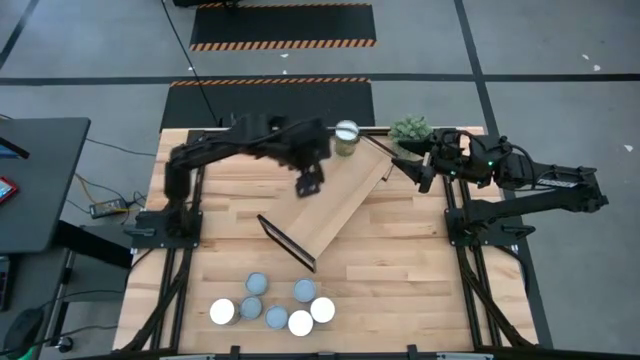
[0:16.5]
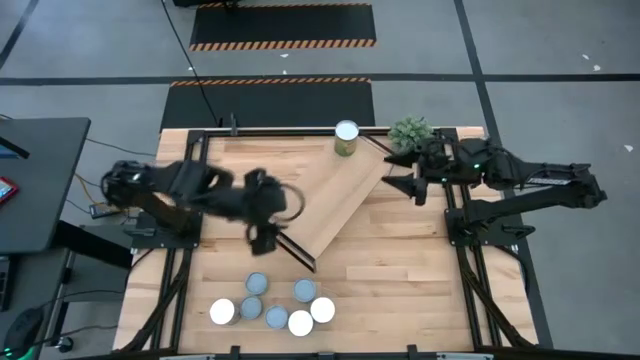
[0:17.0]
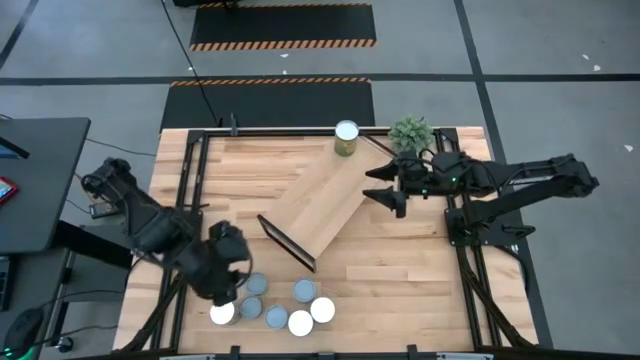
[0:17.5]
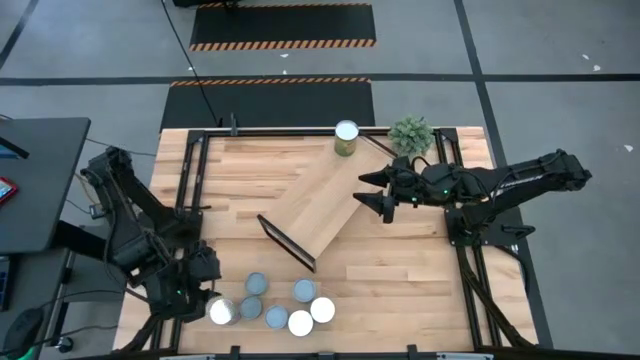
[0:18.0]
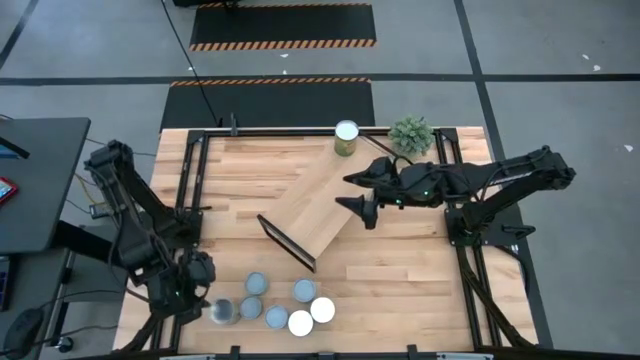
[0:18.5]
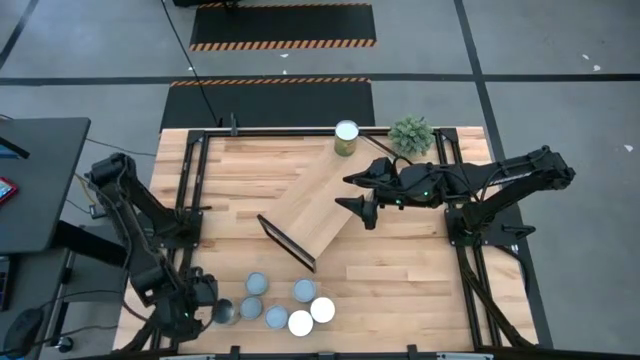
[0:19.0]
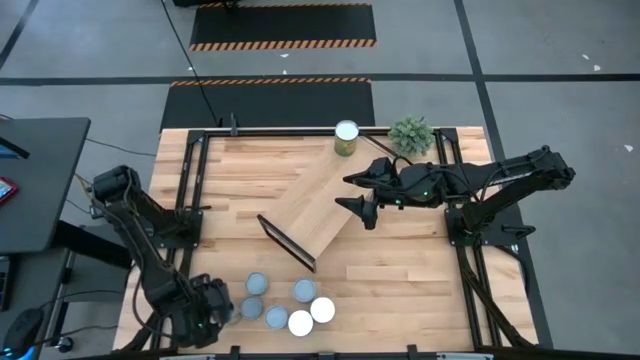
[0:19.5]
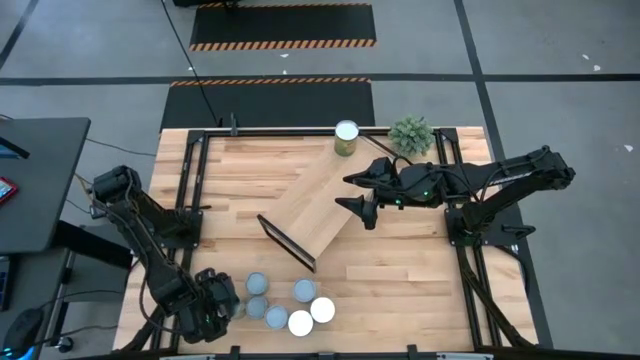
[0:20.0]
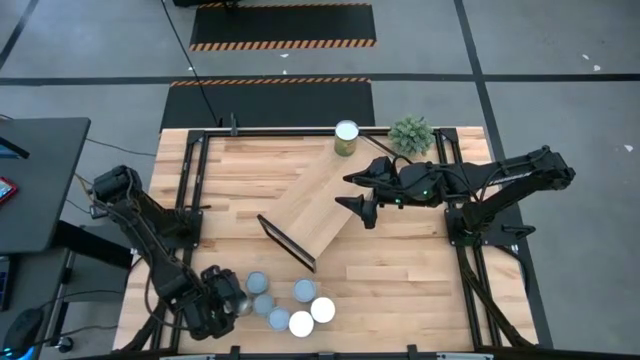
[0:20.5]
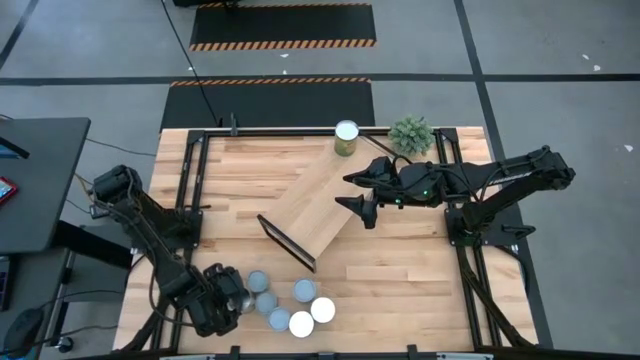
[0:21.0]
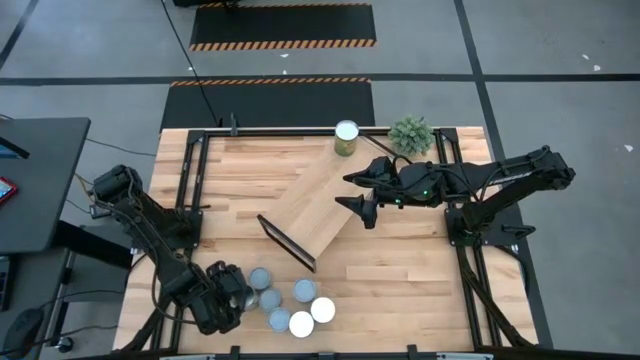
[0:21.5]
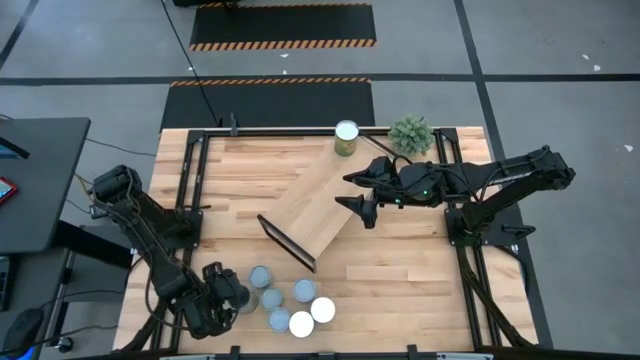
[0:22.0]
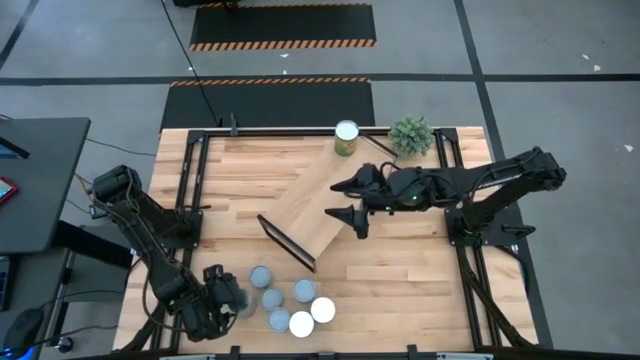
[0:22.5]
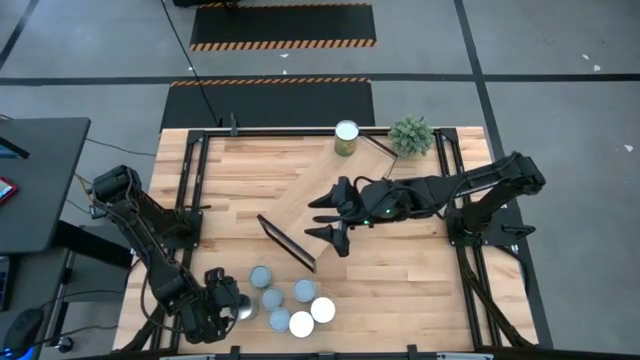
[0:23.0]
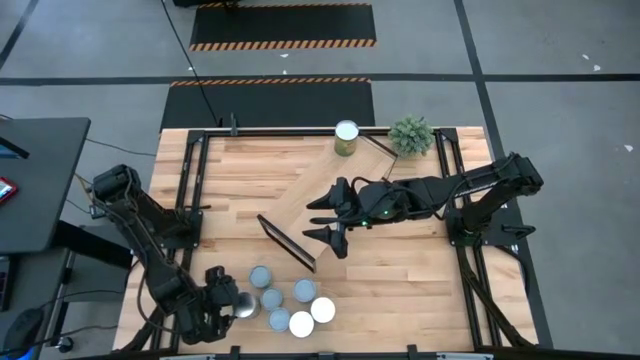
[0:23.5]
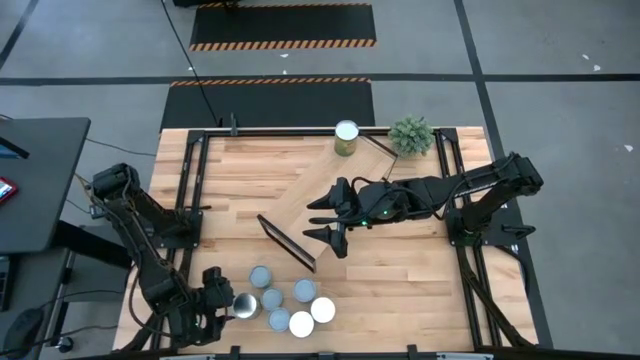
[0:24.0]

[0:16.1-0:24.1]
Task: Pick and place cans onto a shelf
Put the canned peaches on the shelf

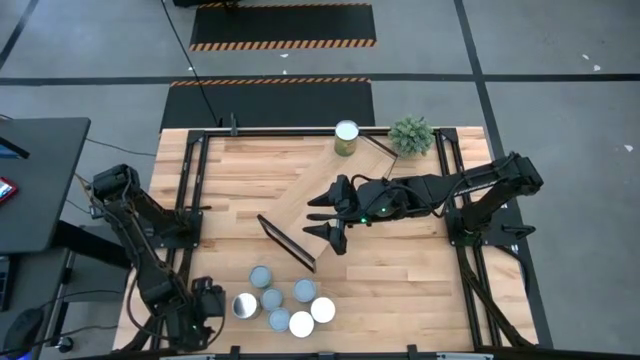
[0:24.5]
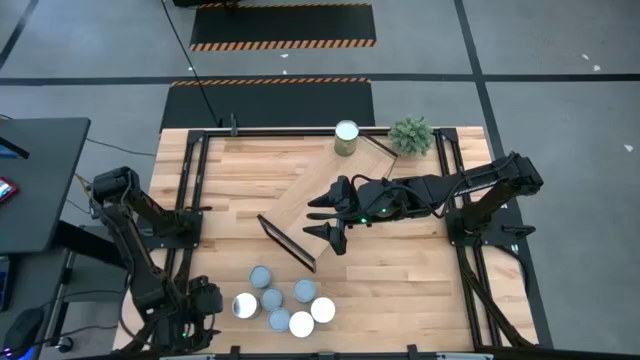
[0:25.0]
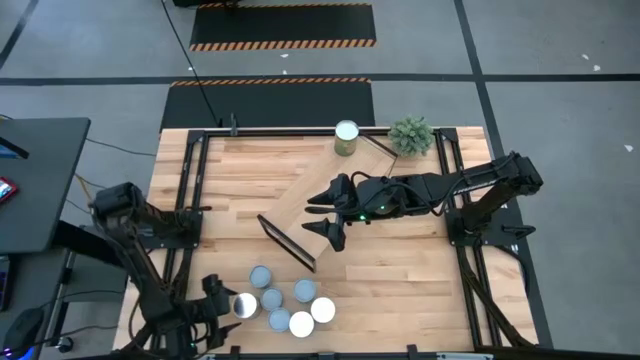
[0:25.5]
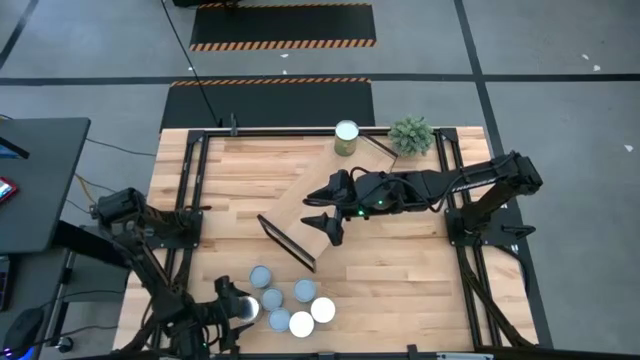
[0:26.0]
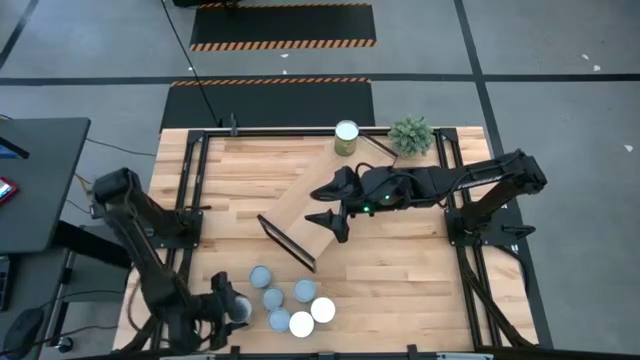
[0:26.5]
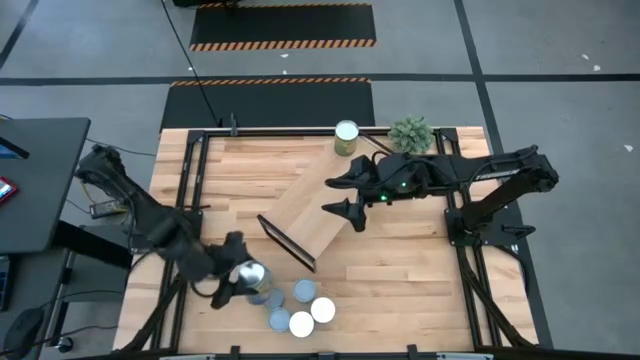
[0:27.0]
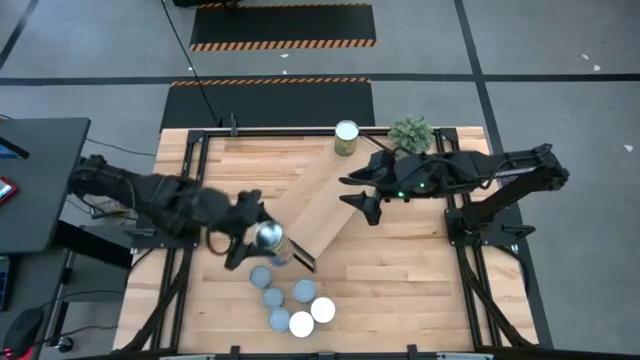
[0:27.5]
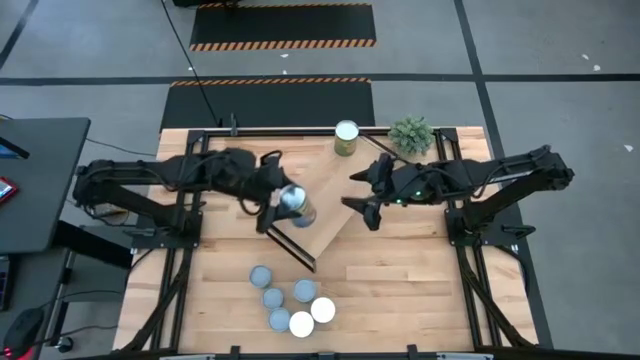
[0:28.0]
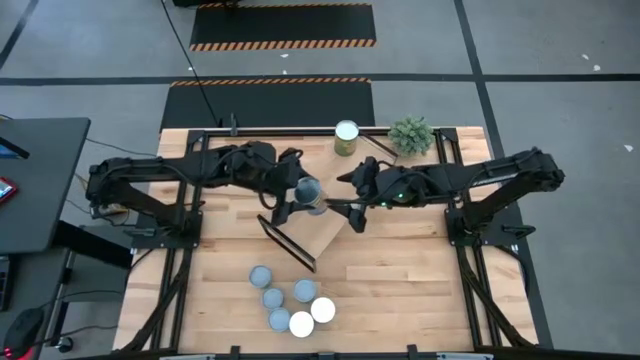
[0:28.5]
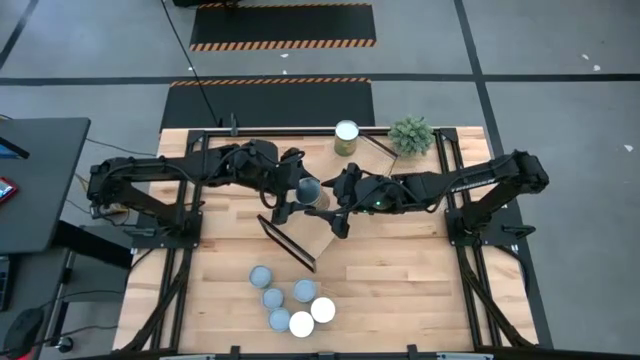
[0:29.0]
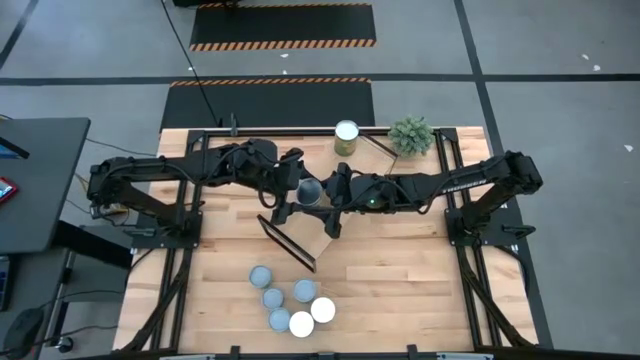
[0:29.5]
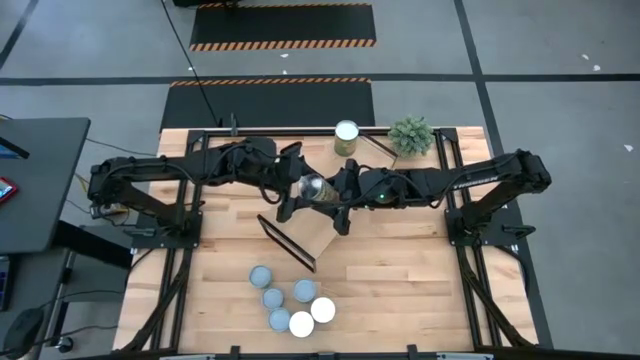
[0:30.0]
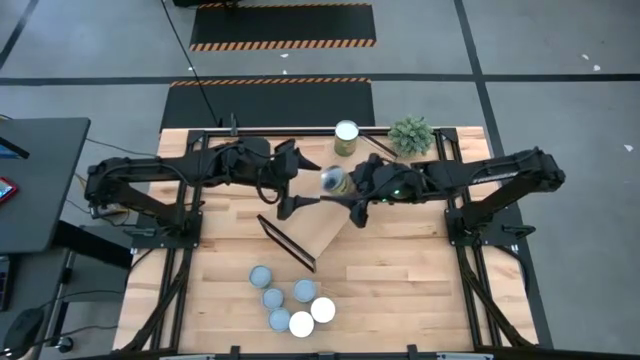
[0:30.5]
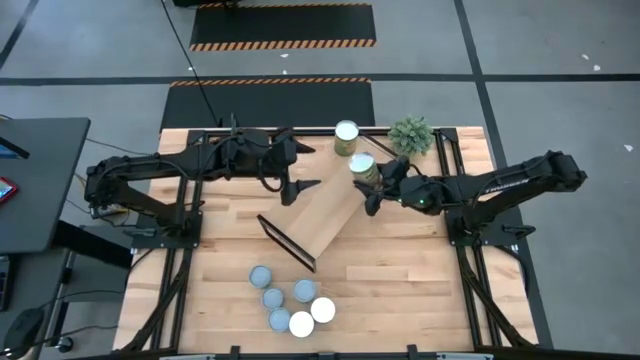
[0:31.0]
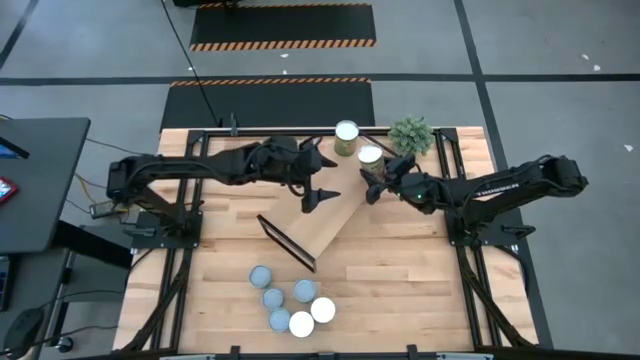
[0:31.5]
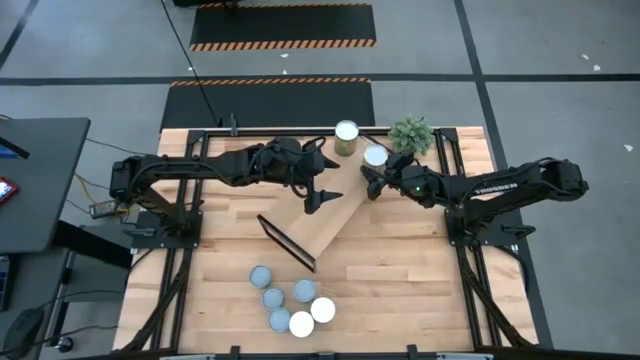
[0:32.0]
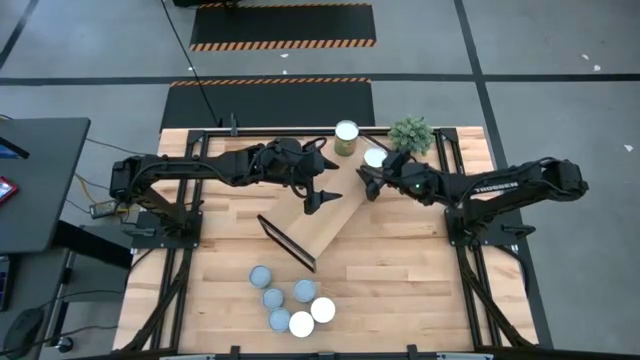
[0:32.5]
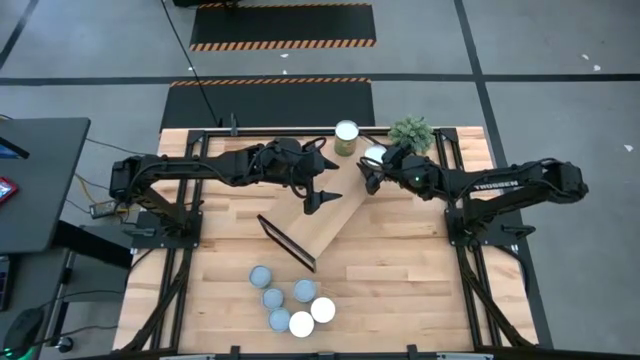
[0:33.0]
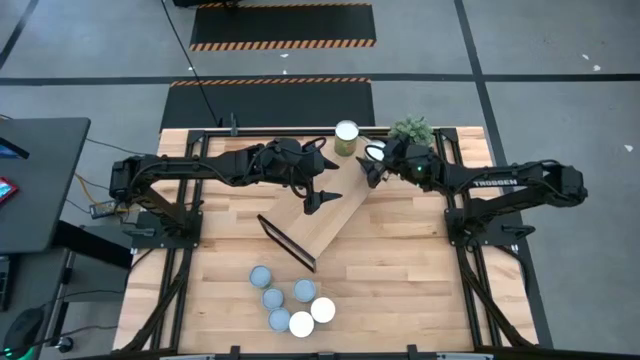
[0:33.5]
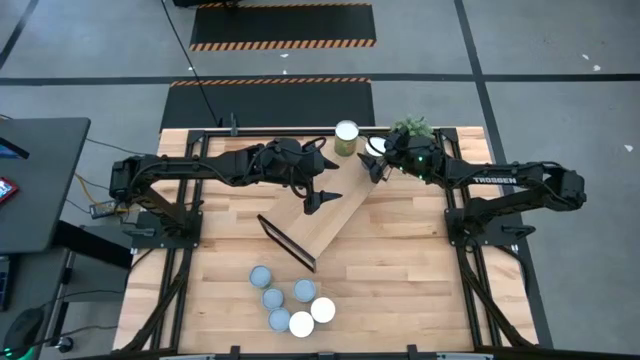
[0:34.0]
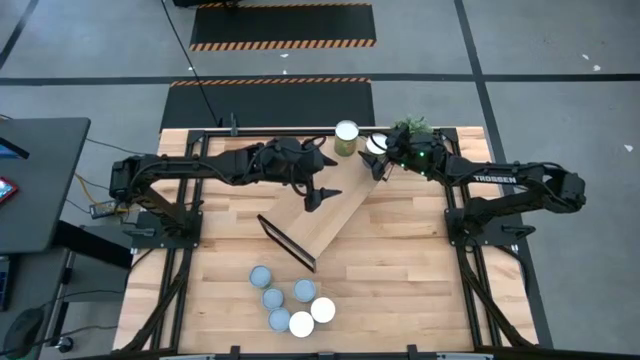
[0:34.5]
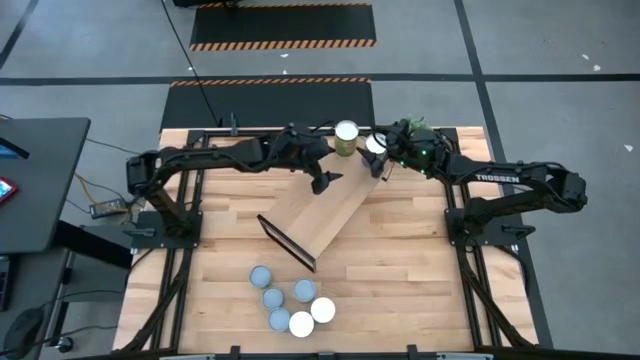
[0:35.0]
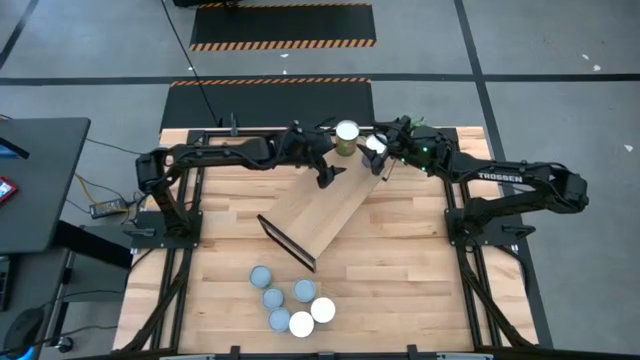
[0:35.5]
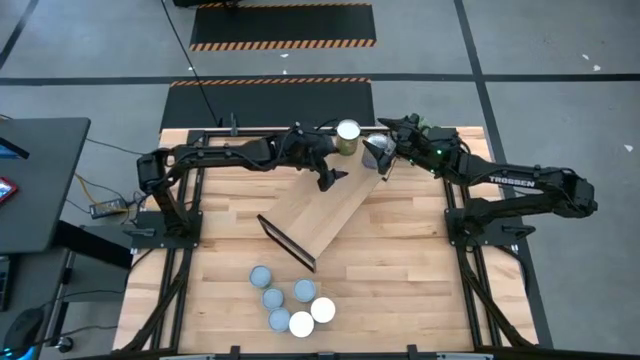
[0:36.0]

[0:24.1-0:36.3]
Put the canned peaches on the shelf
